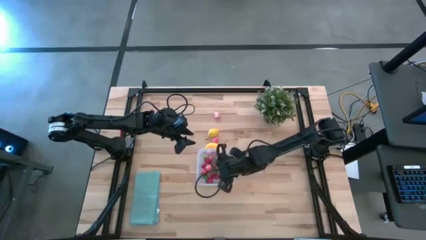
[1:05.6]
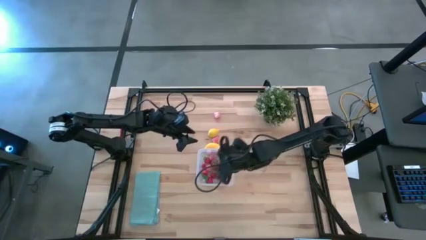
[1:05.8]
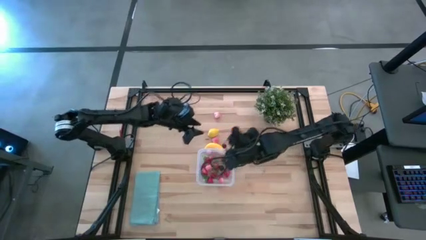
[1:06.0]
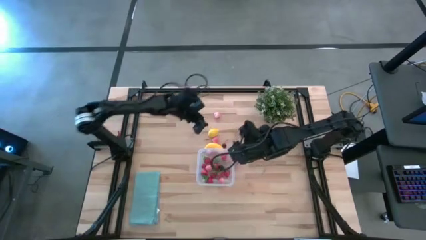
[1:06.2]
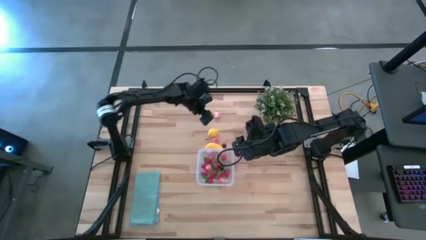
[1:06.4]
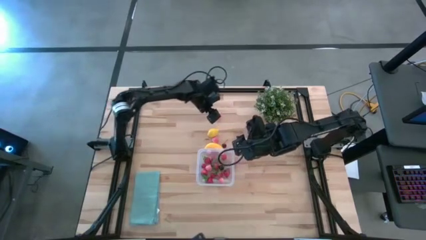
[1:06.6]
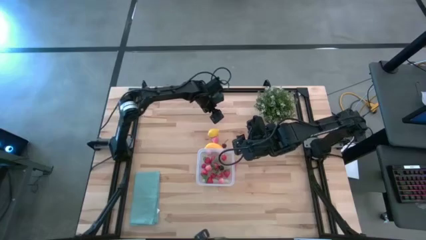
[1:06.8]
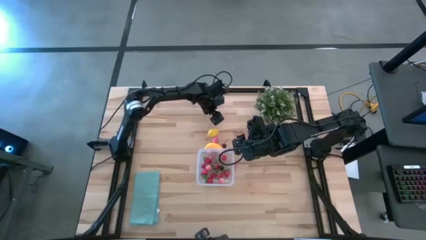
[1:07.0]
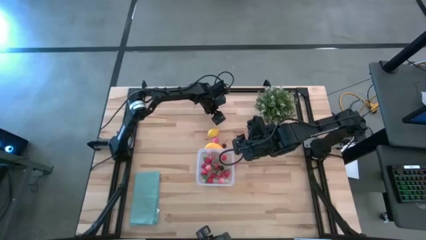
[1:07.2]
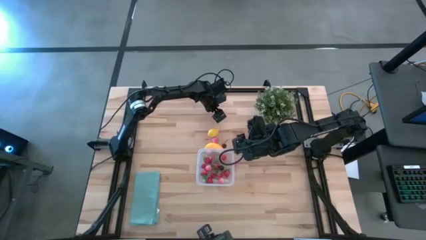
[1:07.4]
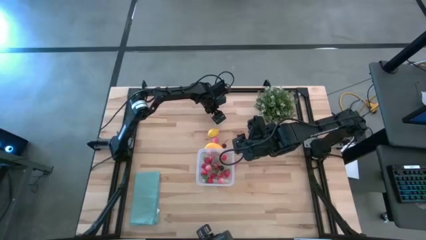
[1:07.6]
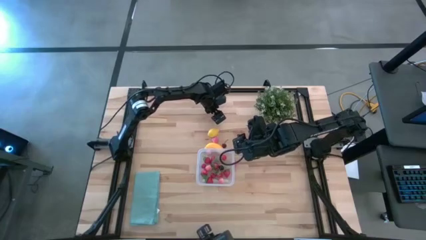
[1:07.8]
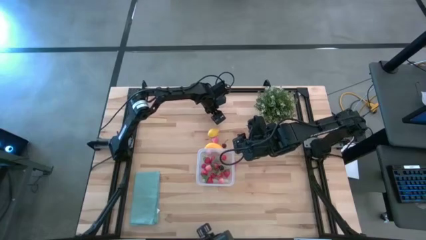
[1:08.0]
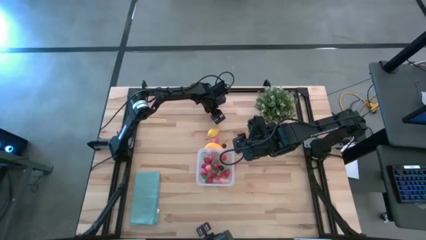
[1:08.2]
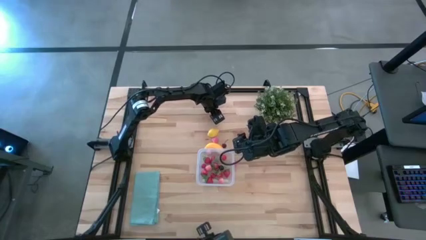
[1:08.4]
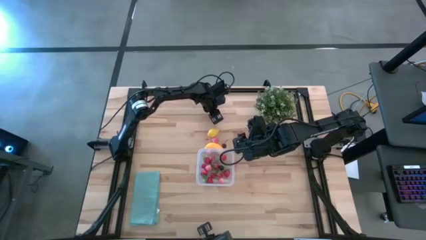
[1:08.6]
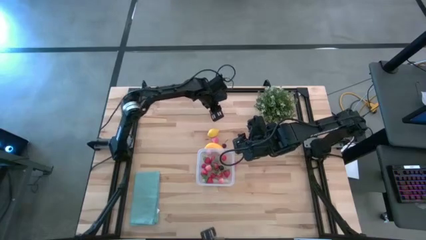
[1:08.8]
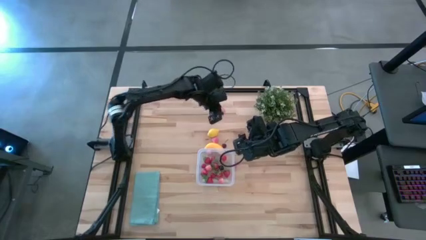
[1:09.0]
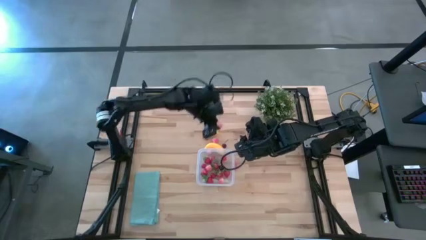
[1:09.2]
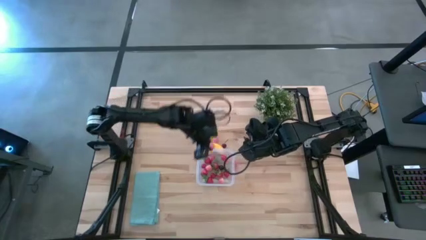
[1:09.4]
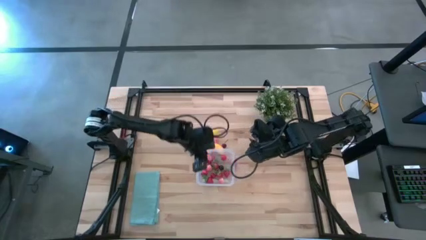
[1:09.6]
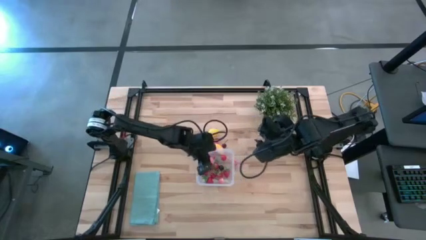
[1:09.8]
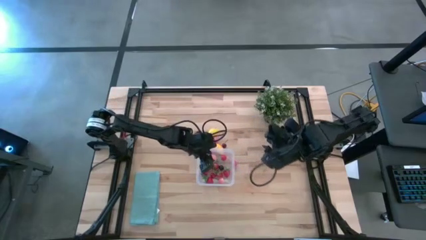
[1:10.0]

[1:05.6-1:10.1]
Task: Pick and placing Produce into tupperware
Put the pink peach into the transparent bin

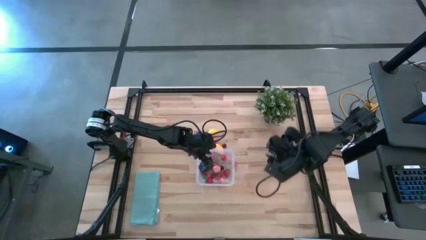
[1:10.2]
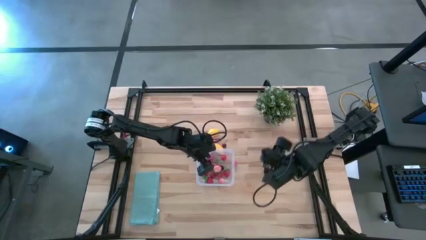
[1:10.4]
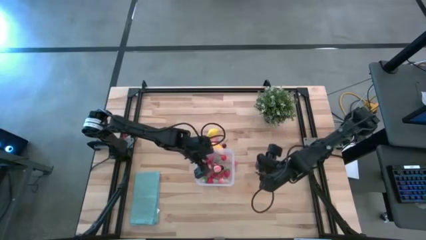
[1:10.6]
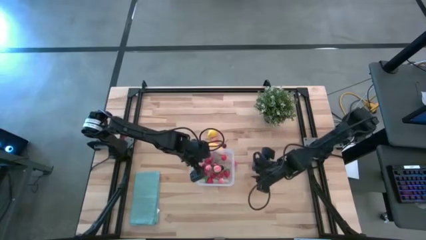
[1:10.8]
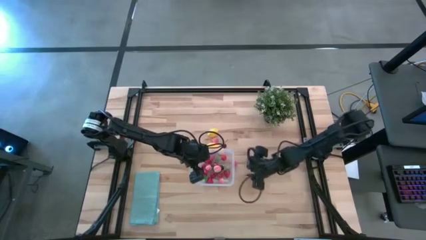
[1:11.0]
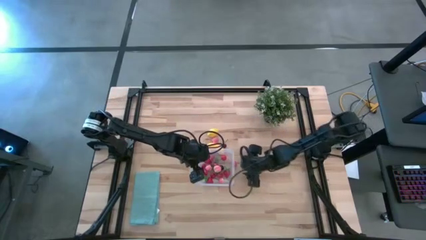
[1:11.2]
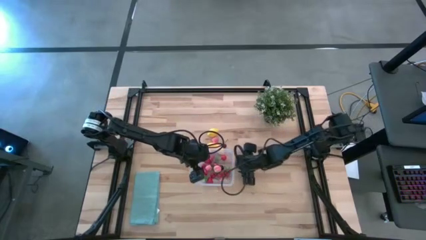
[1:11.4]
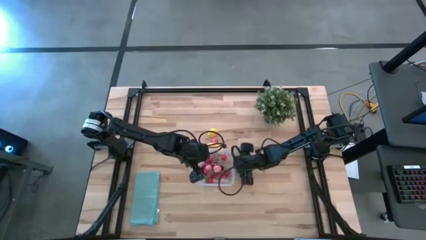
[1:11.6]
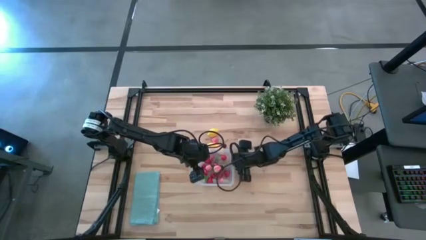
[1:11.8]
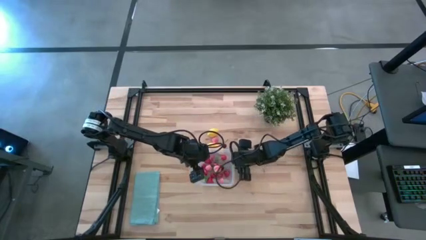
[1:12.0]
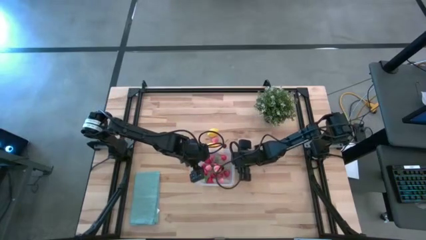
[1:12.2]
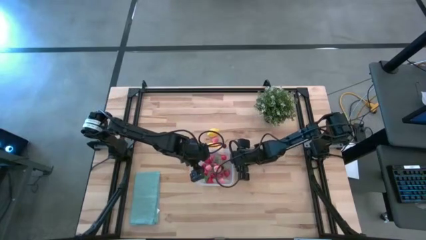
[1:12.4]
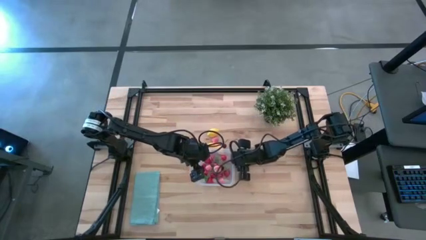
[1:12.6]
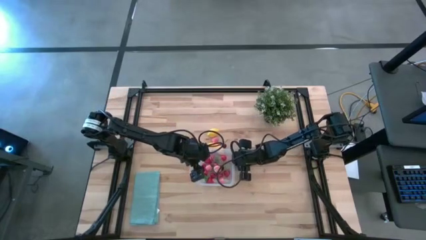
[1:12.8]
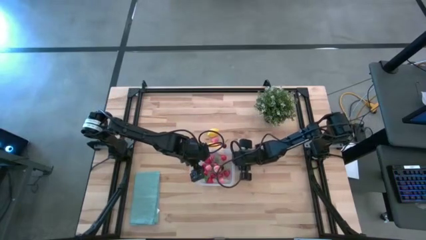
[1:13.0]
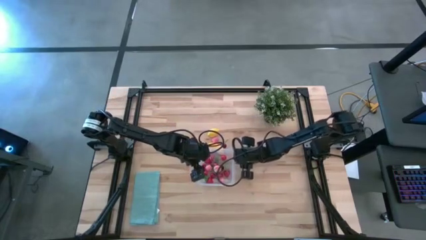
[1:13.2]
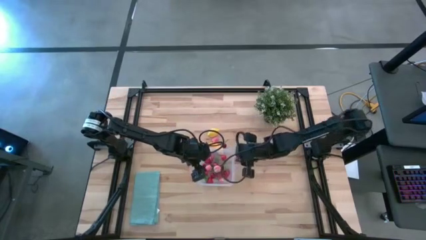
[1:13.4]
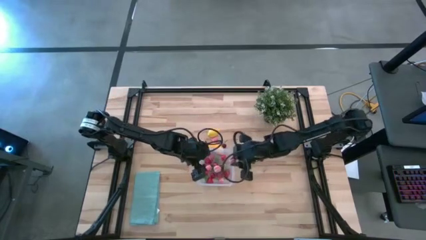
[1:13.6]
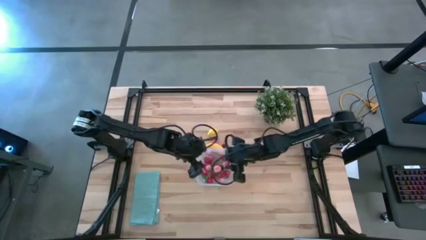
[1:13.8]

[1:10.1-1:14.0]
Put the pink peach into the transparent bin

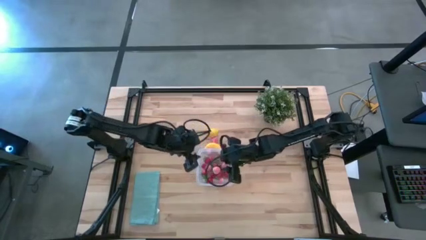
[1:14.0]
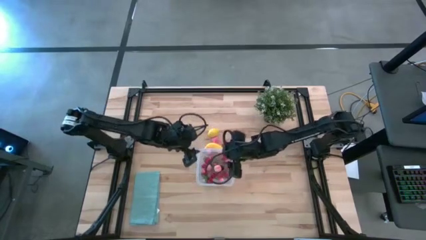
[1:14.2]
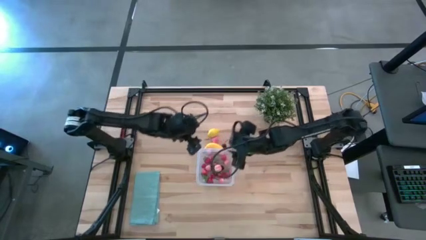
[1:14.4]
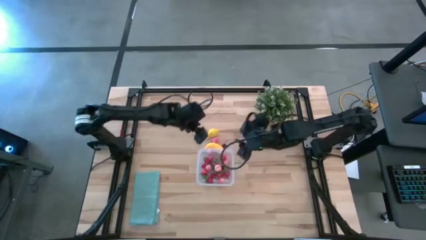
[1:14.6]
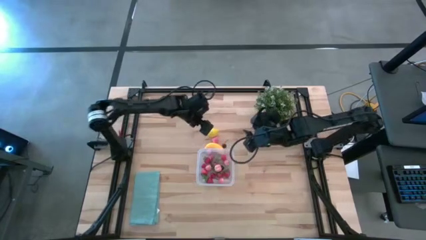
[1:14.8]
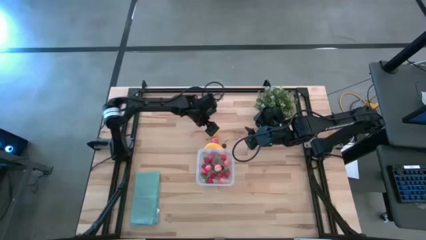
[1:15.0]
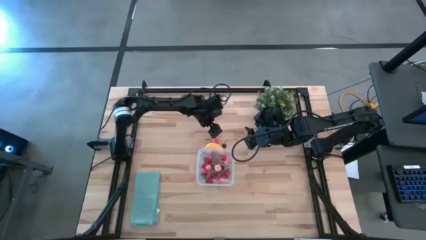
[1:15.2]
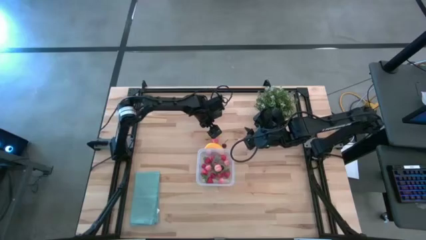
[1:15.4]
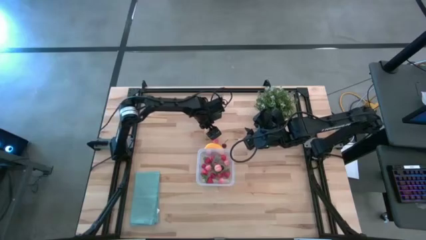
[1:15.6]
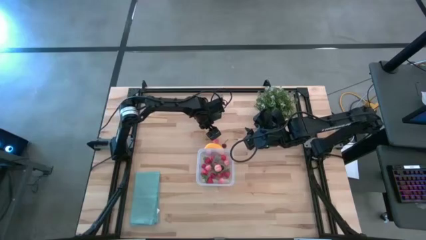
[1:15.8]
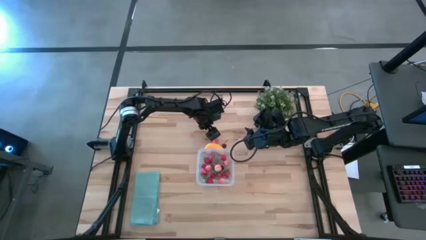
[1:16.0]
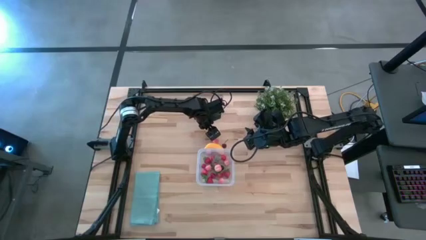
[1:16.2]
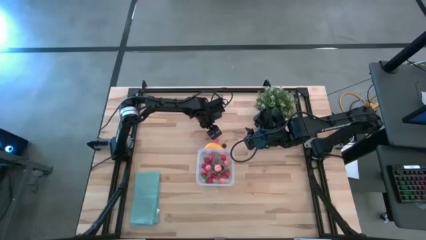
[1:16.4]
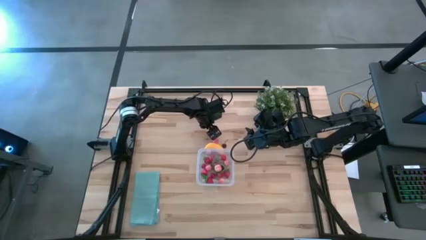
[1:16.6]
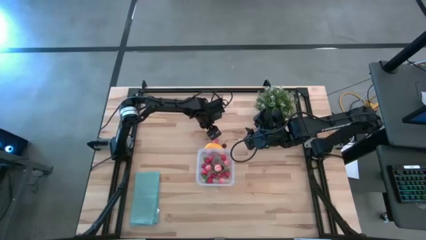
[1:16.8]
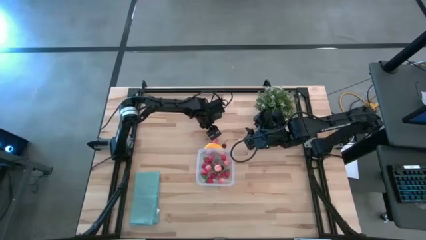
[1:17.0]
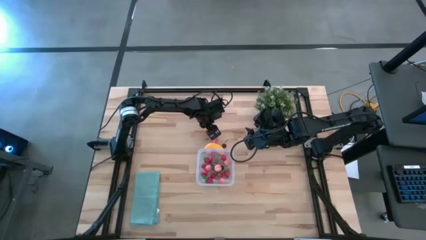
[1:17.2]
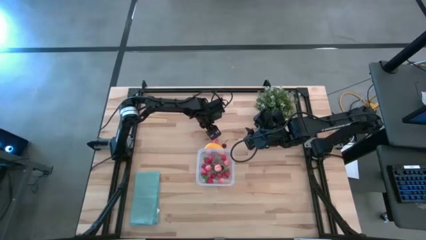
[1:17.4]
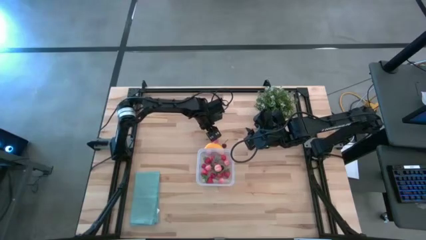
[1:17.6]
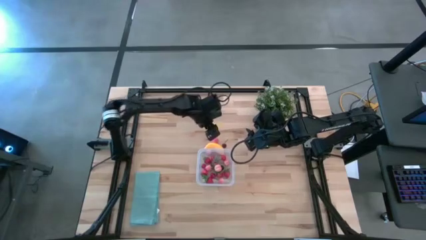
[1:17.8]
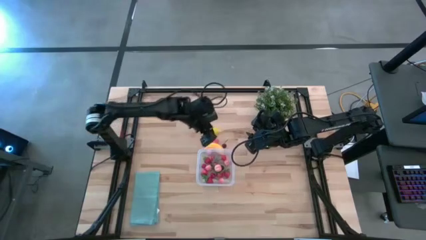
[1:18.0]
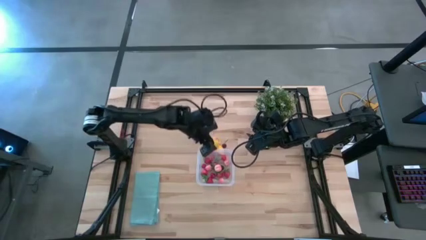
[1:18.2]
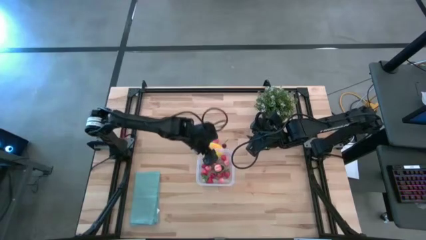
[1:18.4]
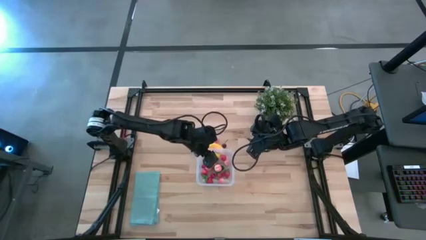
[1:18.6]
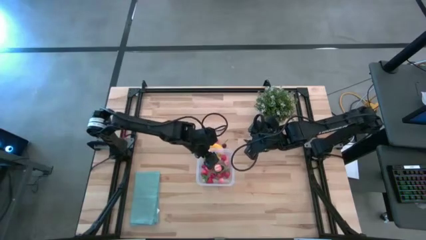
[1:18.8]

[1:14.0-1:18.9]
Put the yellow lemon into the transparent bin

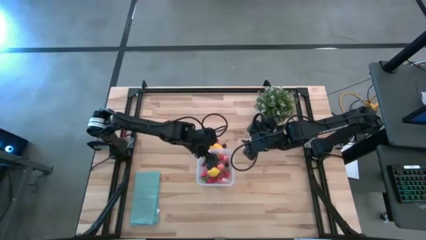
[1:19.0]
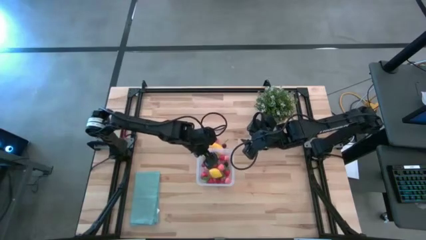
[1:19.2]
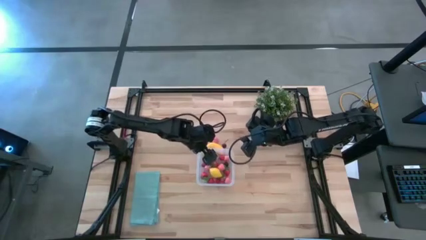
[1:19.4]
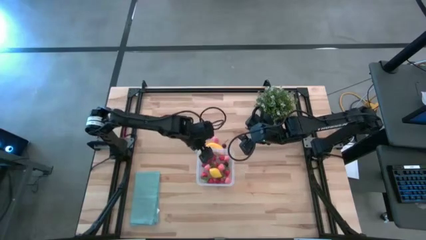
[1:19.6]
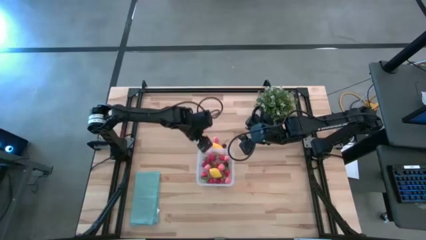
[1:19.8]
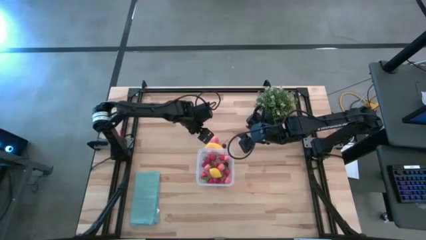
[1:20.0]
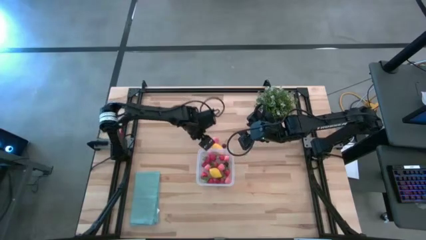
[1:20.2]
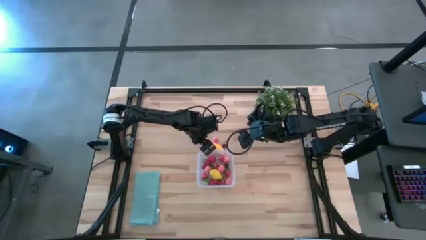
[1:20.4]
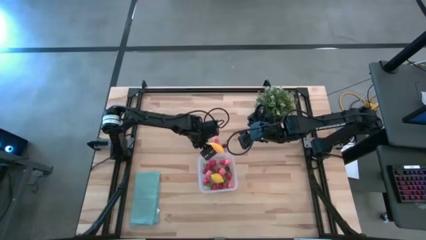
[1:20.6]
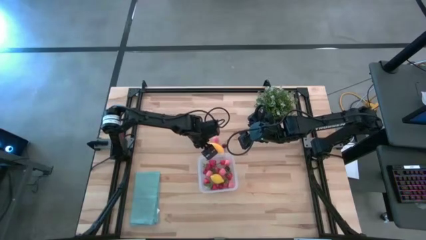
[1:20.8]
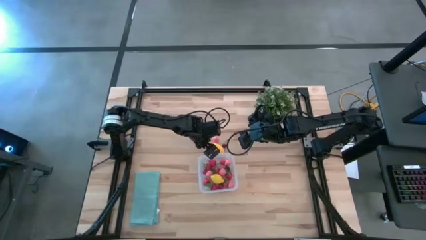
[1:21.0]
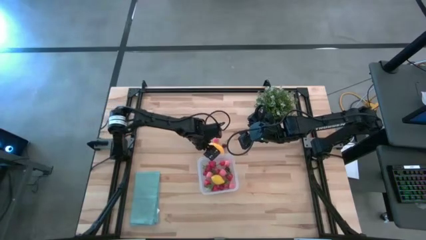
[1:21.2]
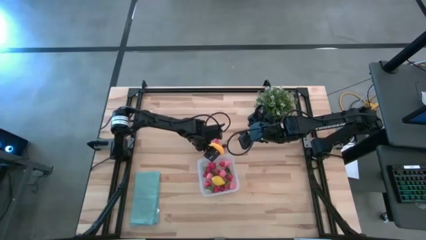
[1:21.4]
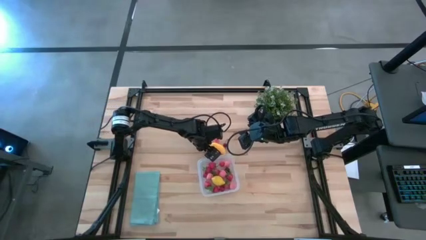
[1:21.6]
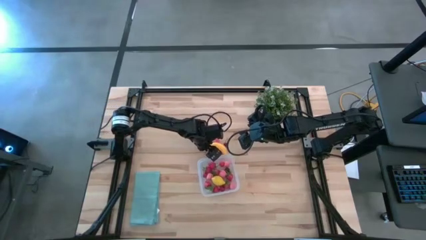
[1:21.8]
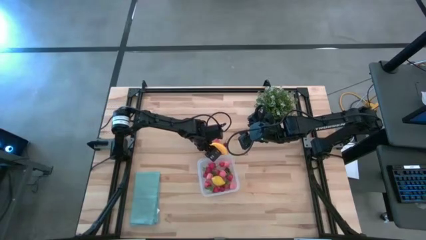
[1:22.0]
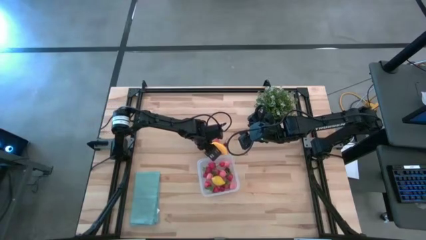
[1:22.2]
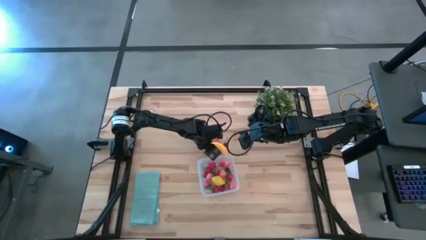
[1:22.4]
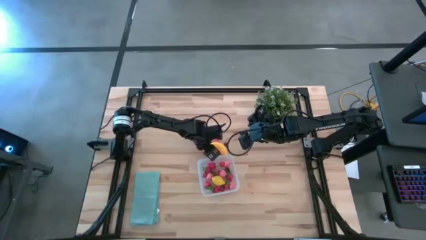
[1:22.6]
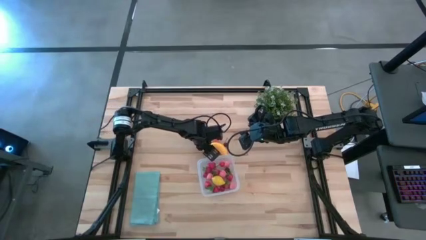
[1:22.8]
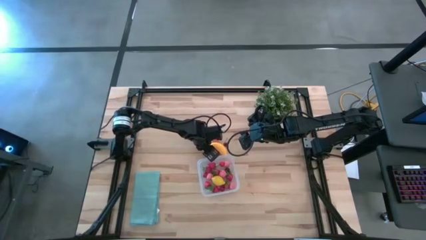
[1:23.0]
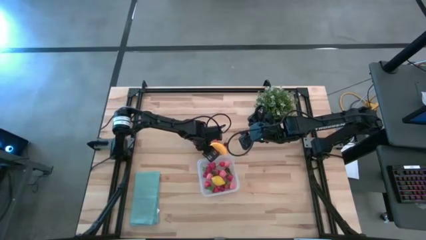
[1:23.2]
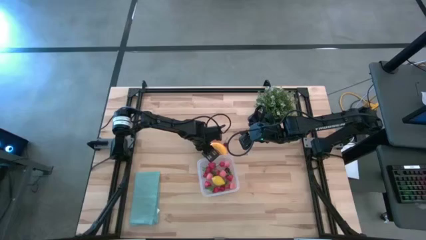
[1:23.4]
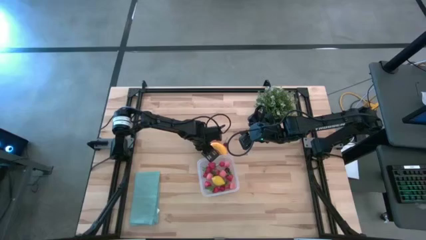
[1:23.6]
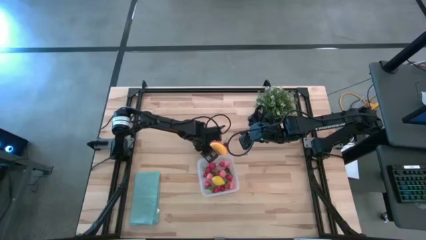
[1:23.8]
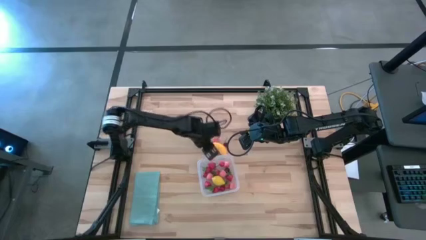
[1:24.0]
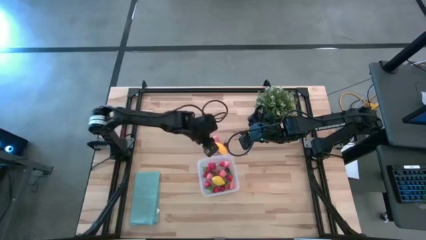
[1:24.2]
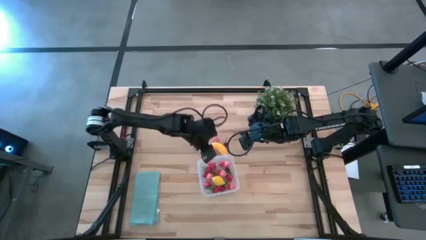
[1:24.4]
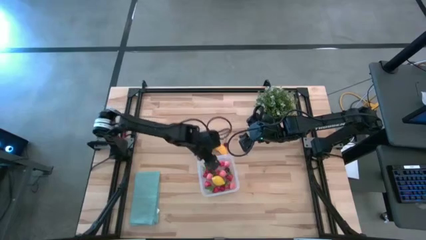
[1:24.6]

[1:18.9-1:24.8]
Put the pink peach into the transparent bin
